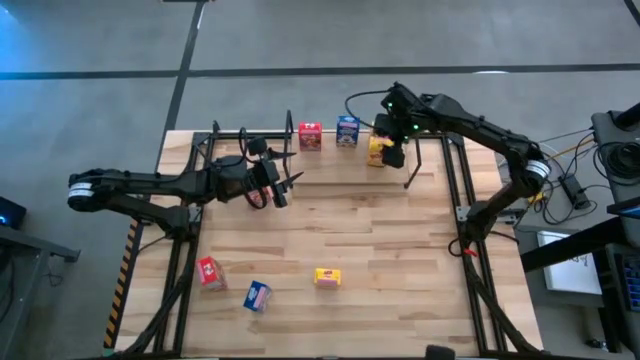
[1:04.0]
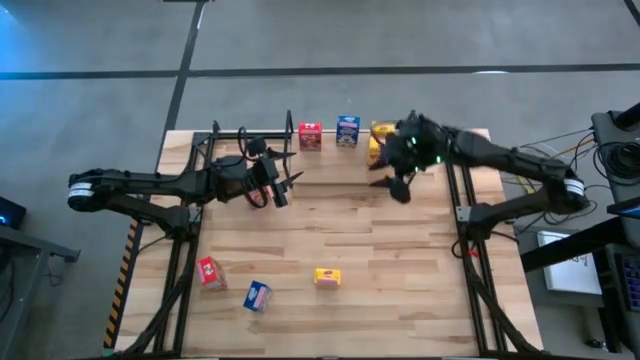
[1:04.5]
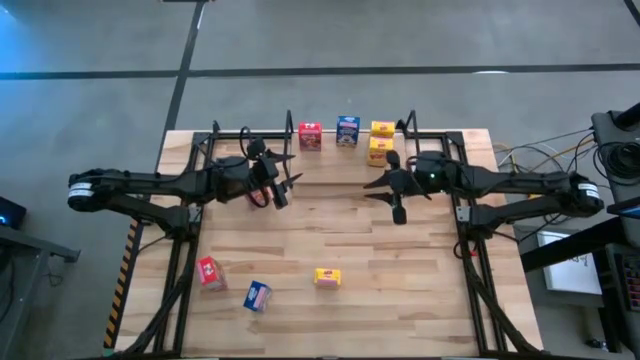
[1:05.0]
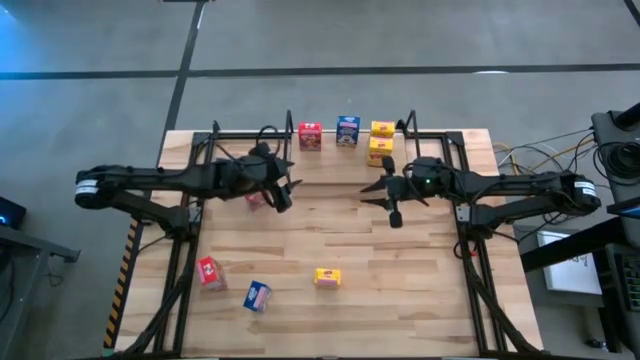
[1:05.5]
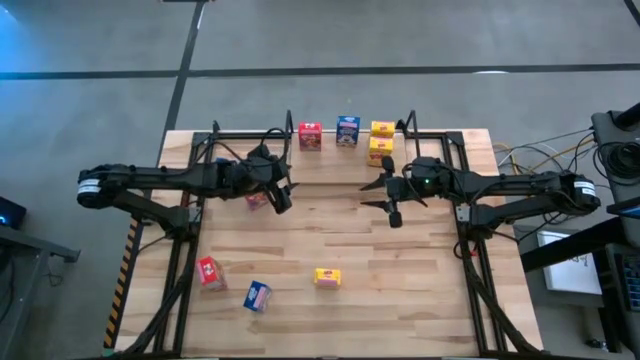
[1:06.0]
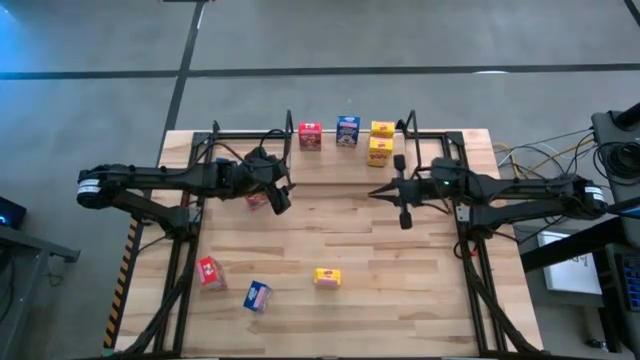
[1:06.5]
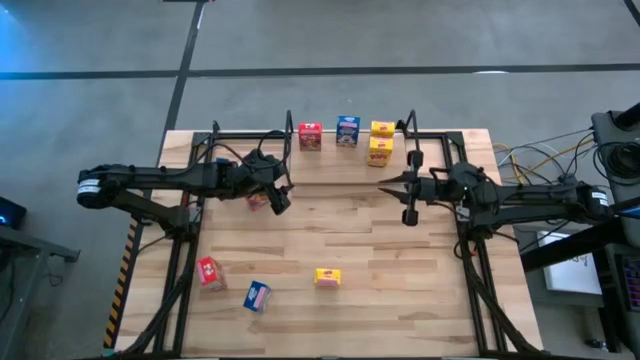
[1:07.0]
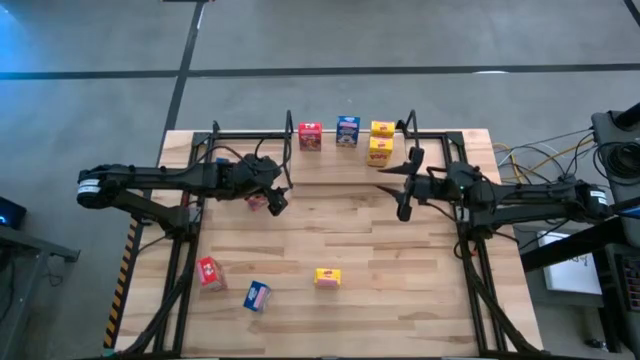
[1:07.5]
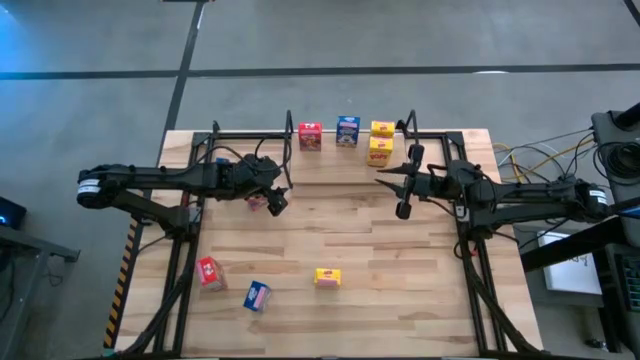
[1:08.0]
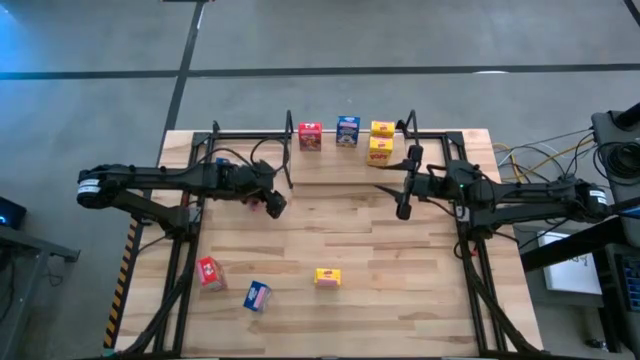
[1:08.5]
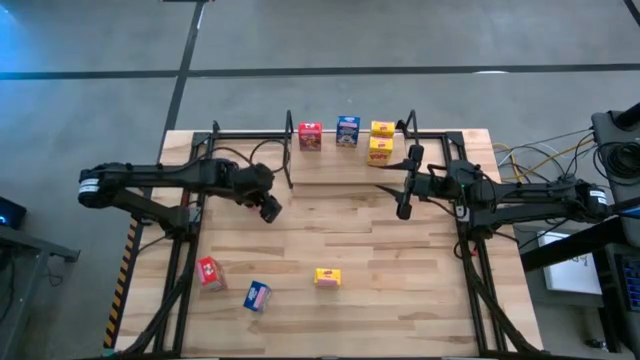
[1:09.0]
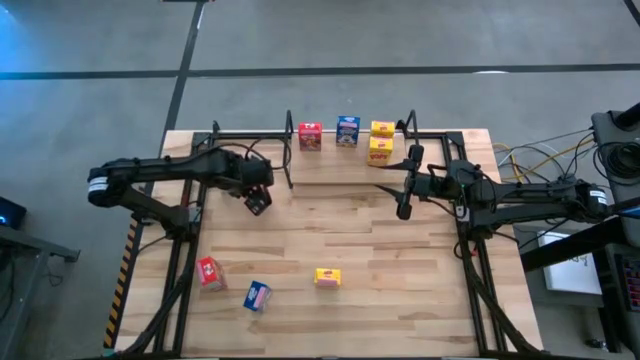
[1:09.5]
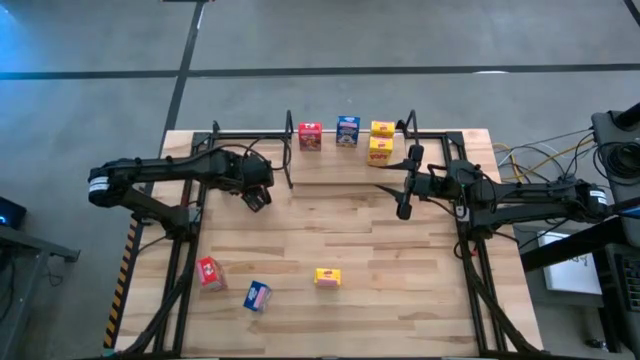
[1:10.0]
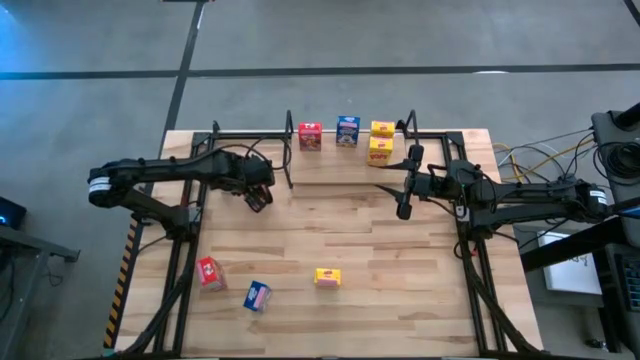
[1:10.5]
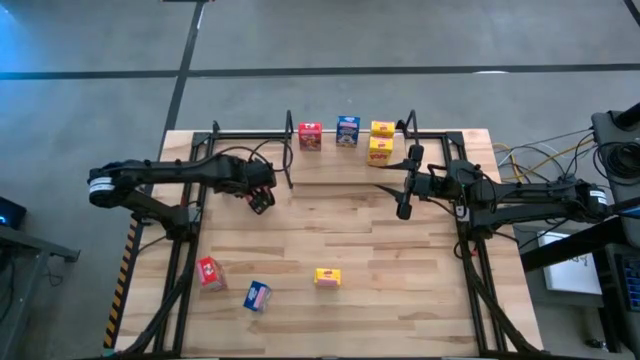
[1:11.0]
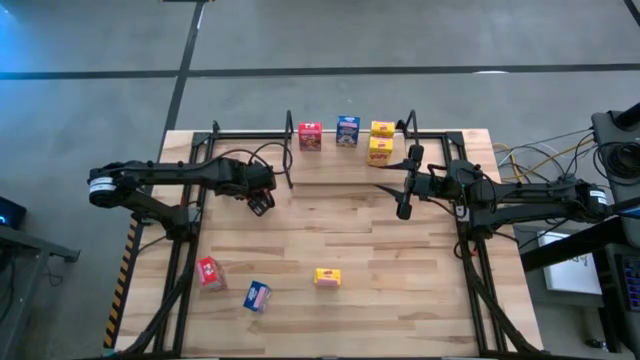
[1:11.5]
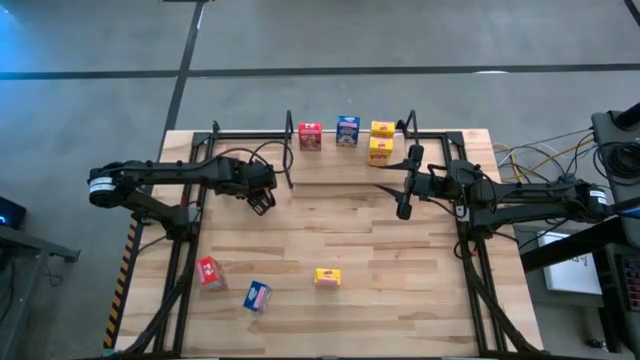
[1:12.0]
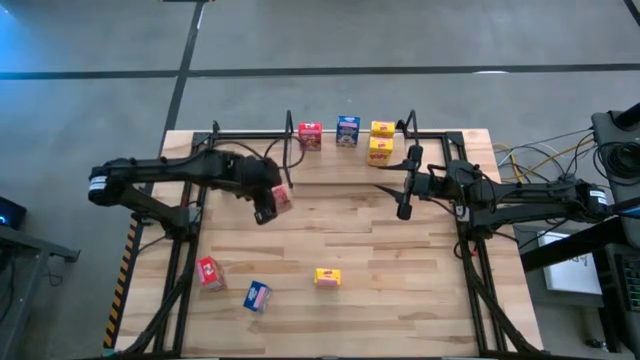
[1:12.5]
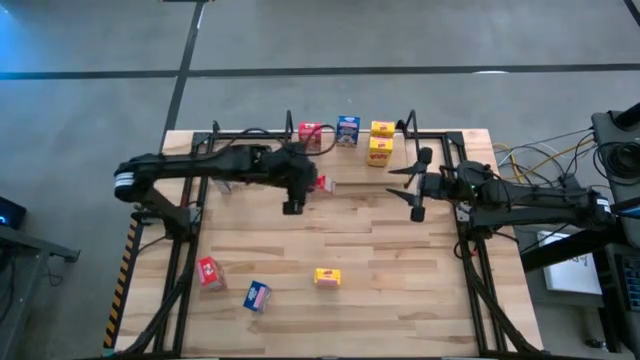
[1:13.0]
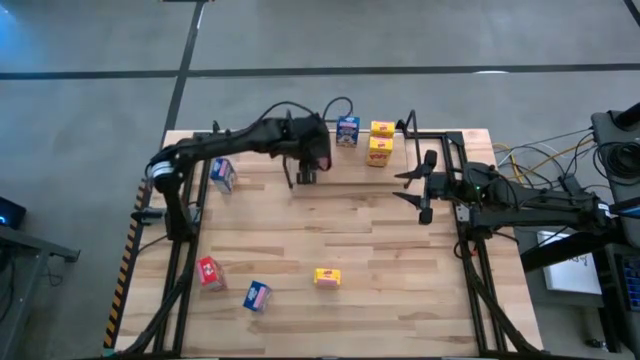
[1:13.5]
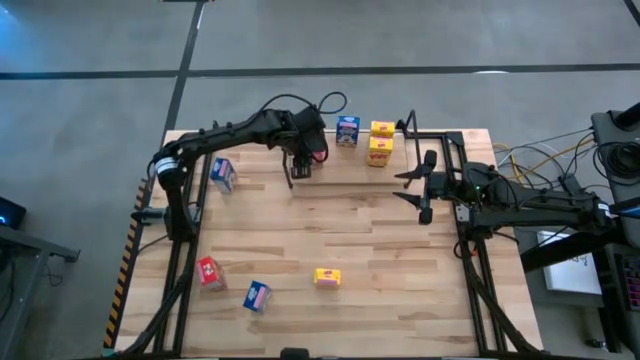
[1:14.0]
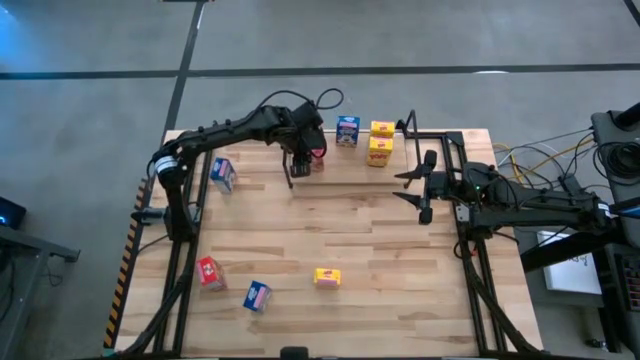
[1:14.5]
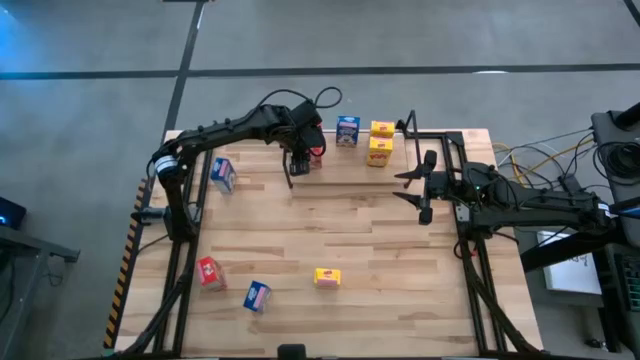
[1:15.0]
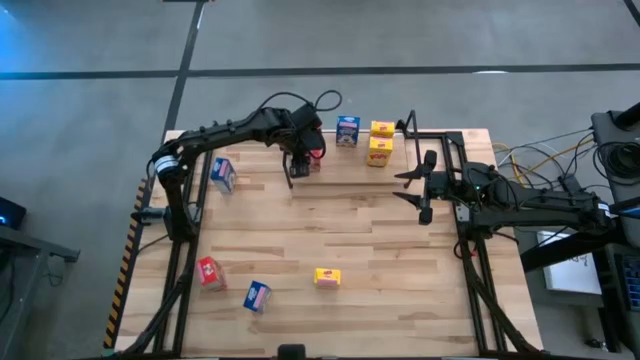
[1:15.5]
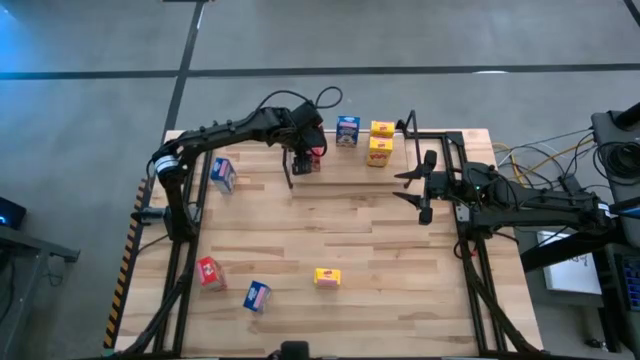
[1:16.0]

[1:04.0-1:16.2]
Task: Stack cereal on shelf
Put the top red cereal box on the shelf aligned with the other red cereal box

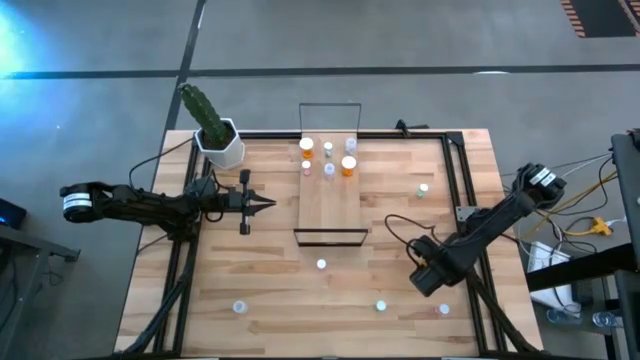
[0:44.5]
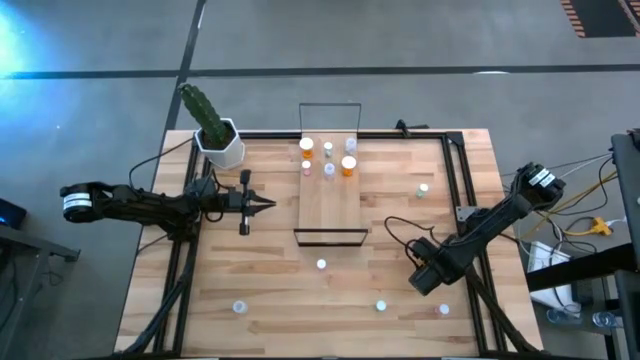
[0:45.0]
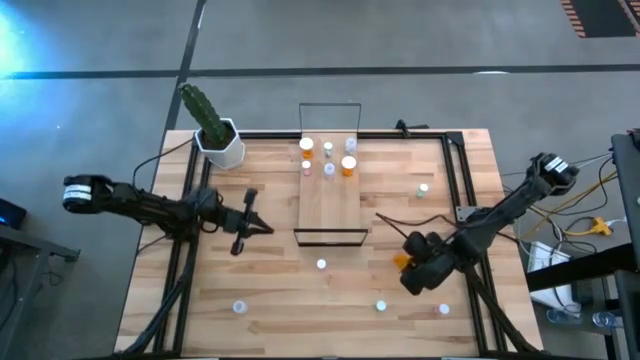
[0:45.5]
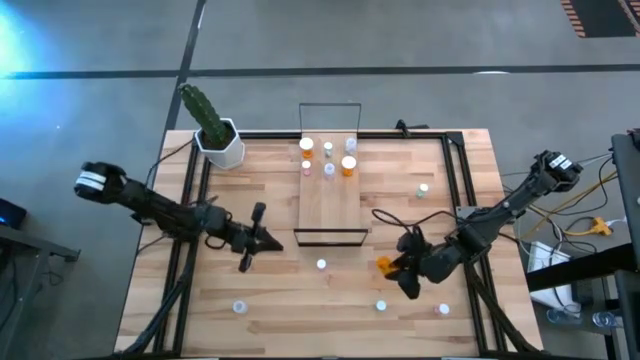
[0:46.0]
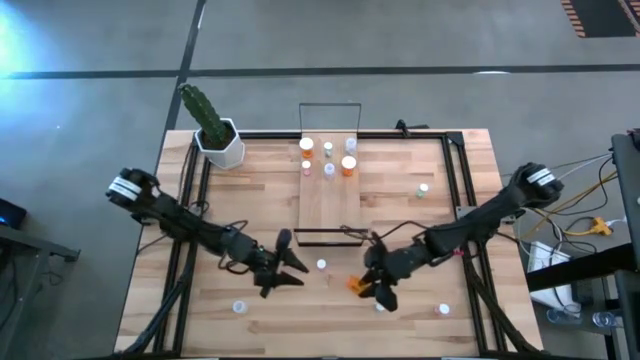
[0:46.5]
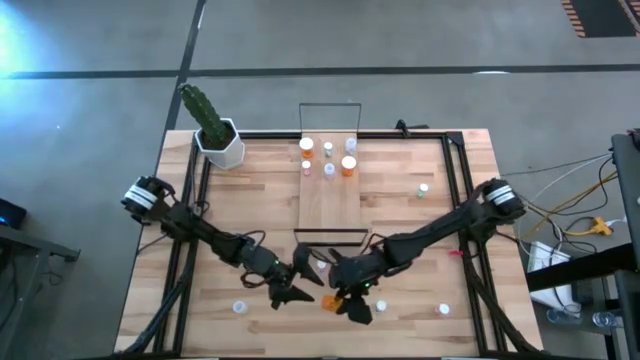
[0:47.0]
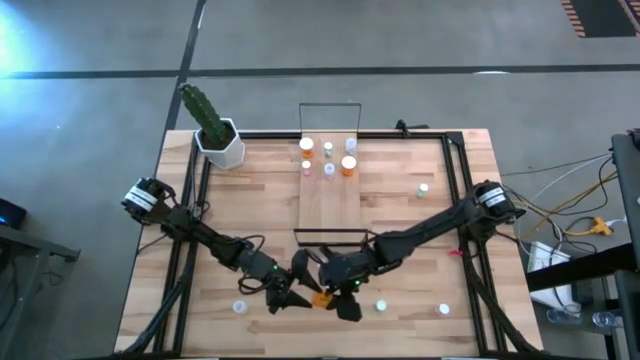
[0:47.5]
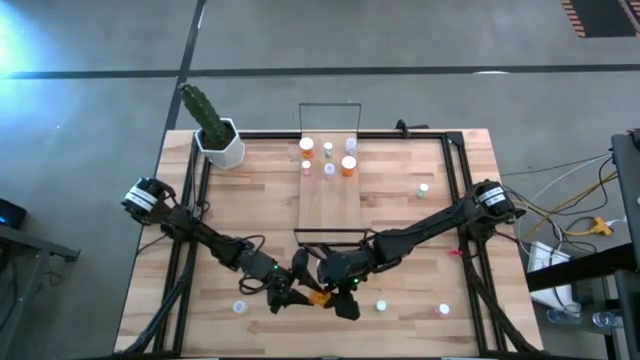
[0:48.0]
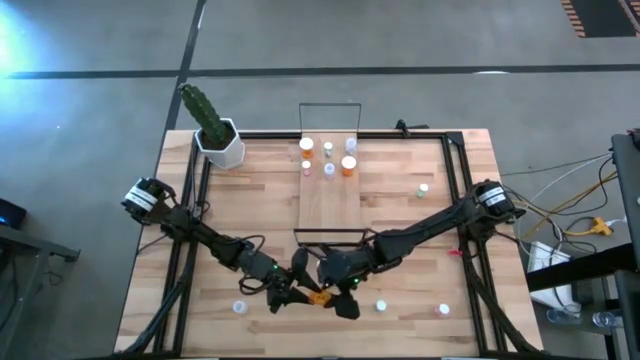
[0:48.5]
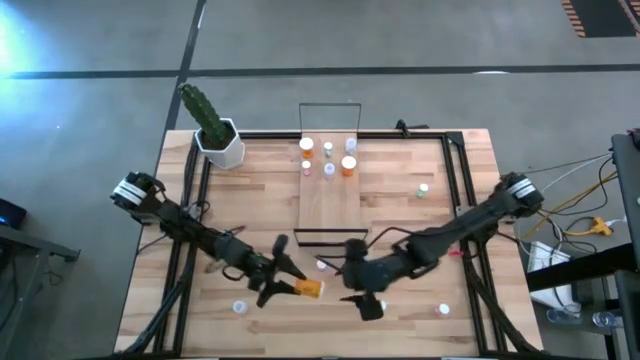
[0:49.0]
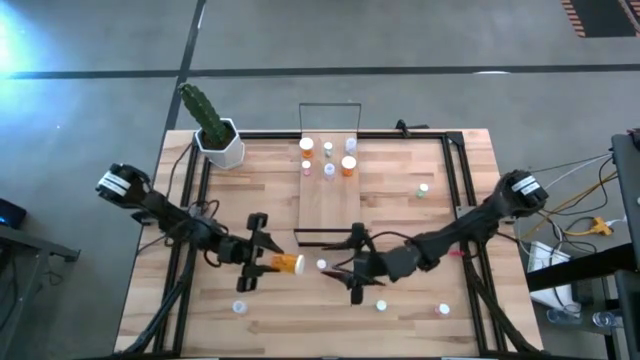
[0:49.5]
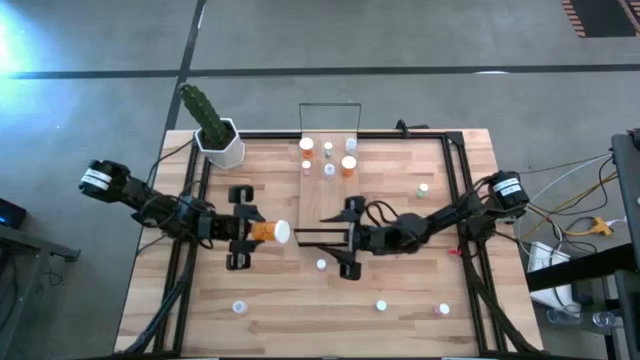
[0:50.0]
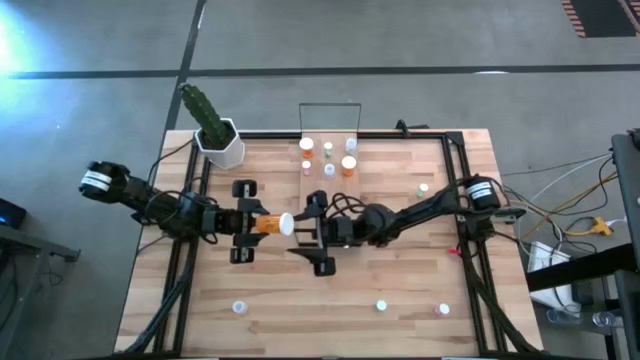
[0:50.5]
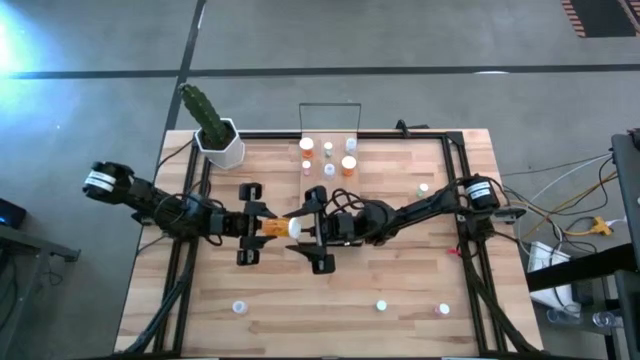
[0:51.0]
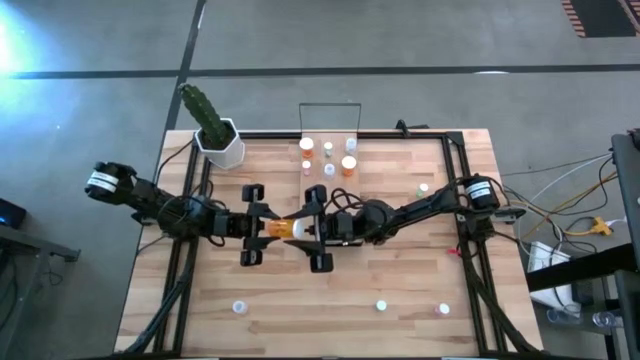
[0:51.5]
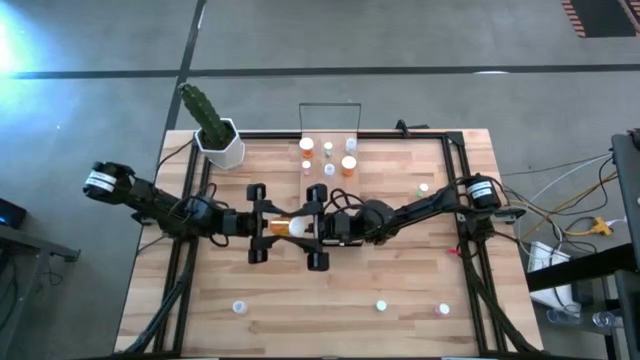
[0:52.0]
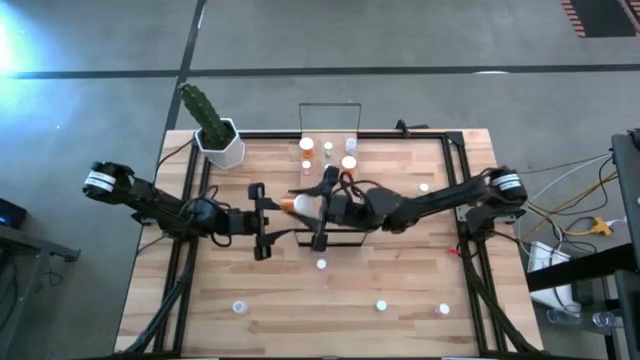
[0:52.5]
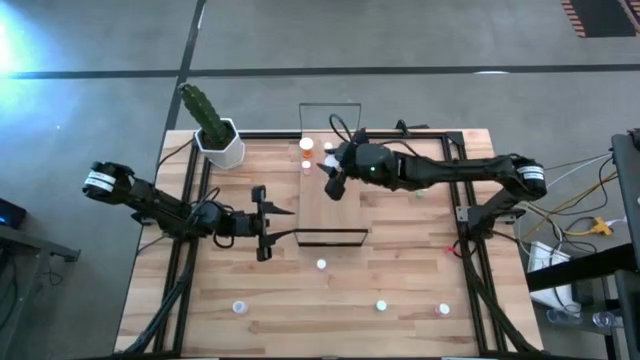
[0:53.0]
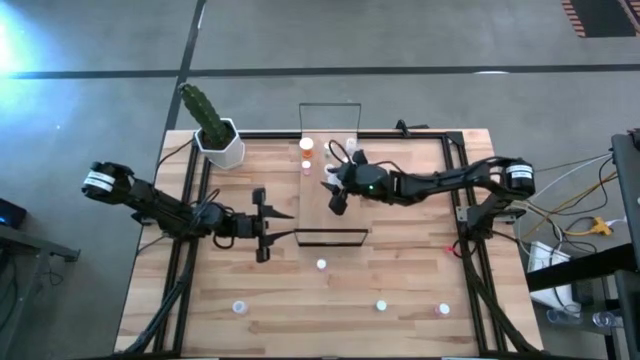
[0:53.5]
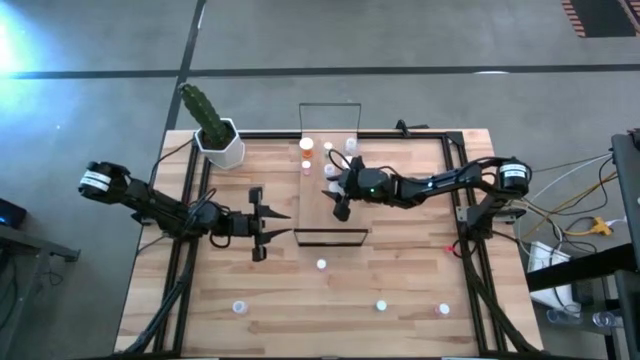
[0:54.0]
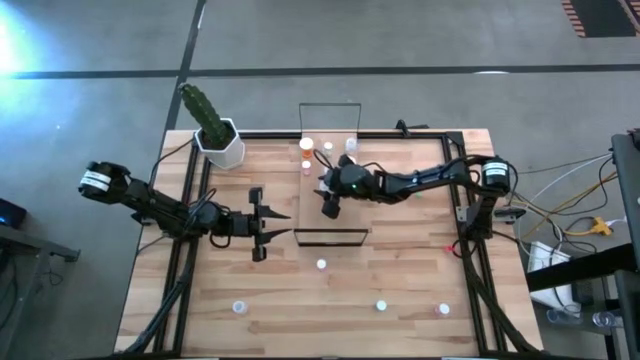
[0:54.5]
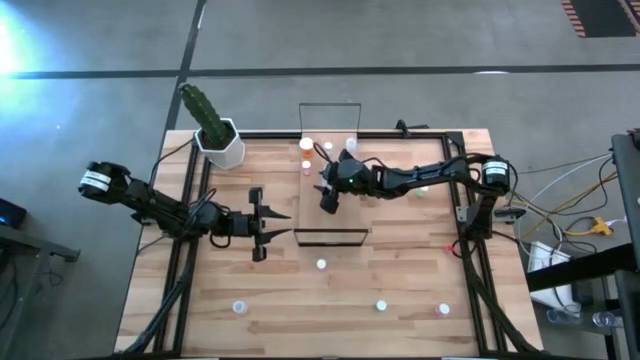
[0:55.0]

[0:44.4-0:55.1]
Task: Pick and place medicine bottles onto shelf by color
Put the yellow transparent pill bottle on the shelf
